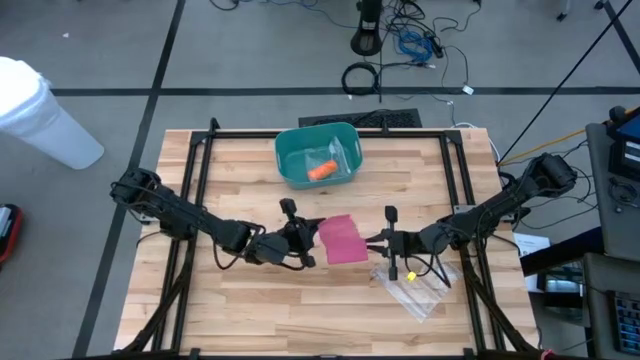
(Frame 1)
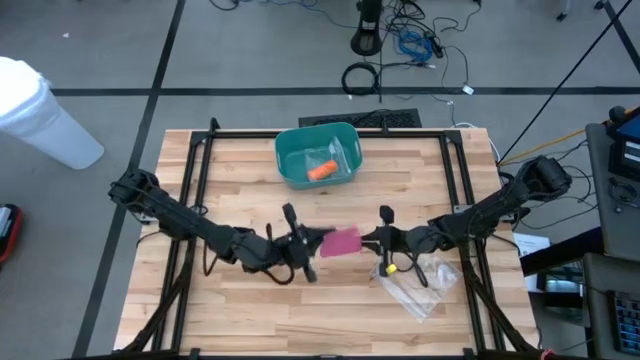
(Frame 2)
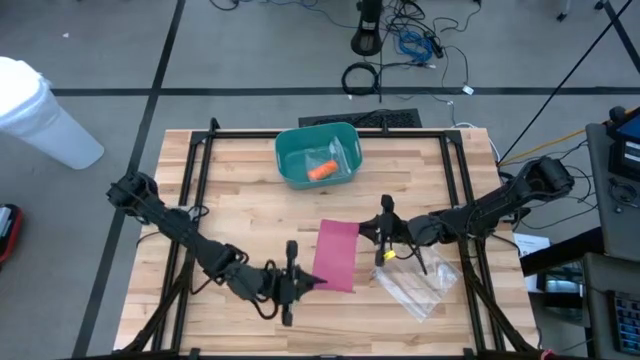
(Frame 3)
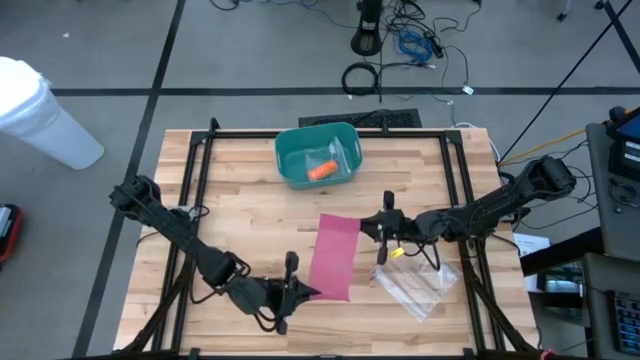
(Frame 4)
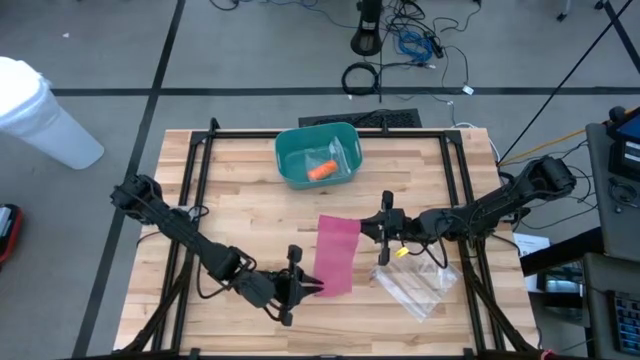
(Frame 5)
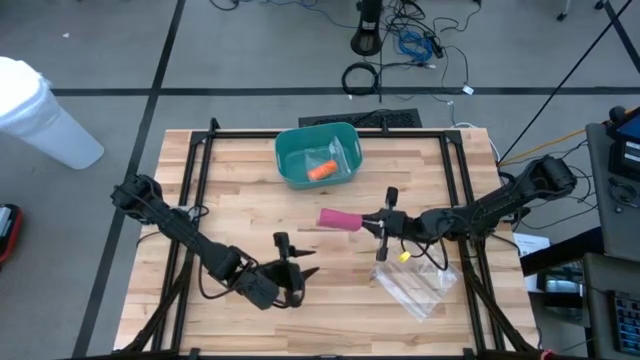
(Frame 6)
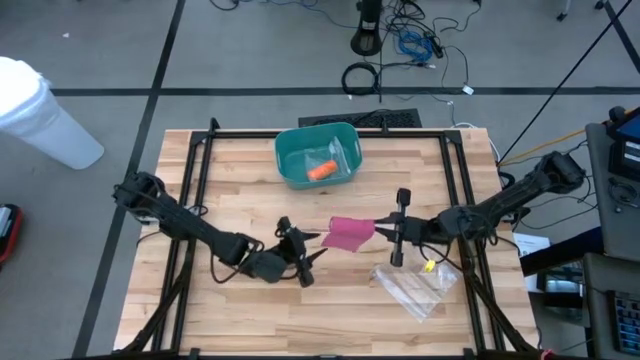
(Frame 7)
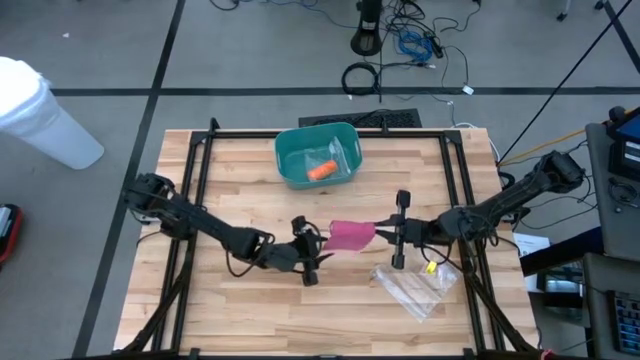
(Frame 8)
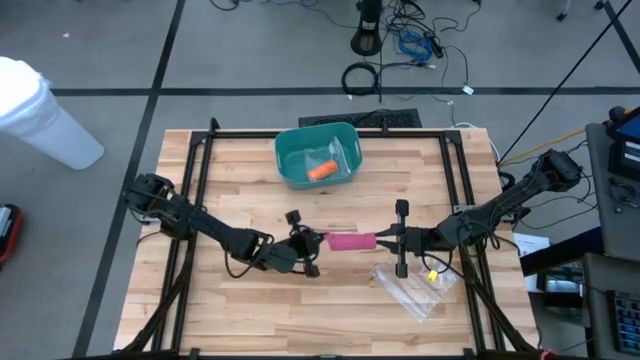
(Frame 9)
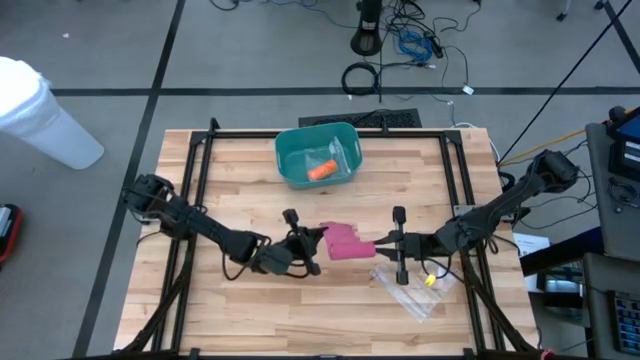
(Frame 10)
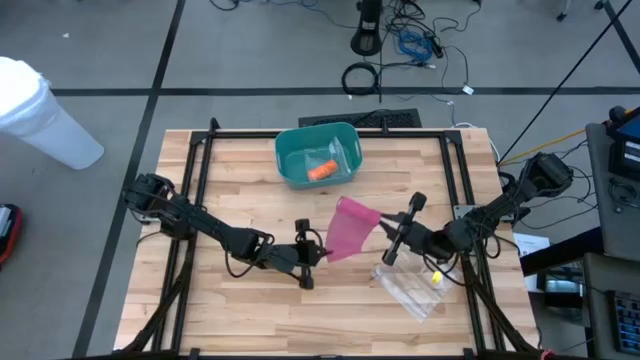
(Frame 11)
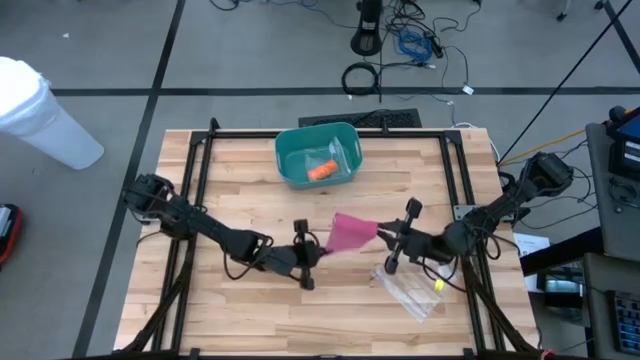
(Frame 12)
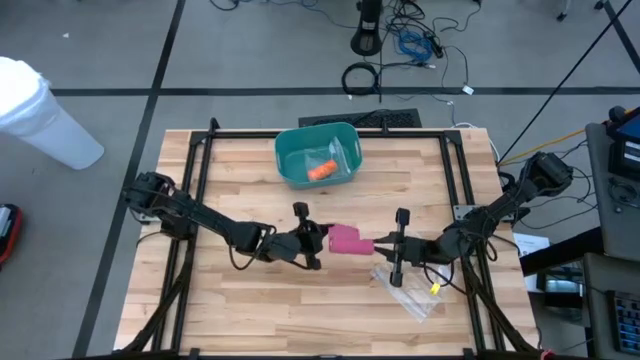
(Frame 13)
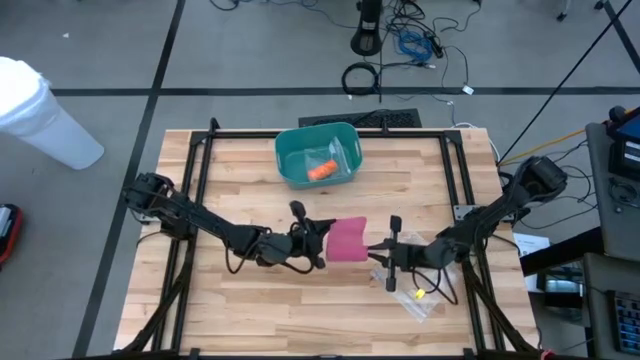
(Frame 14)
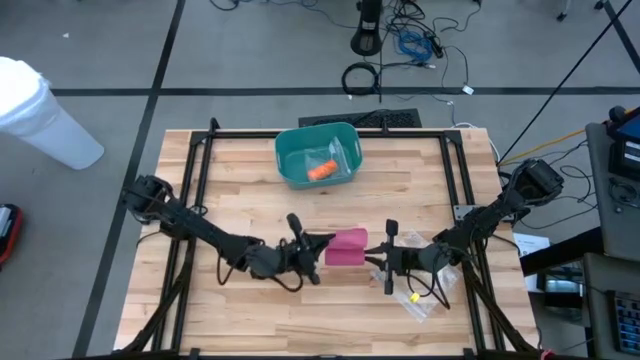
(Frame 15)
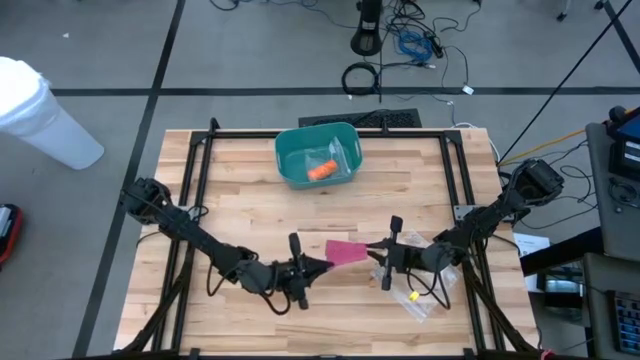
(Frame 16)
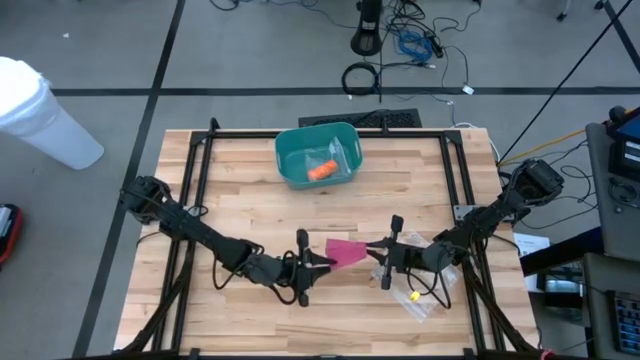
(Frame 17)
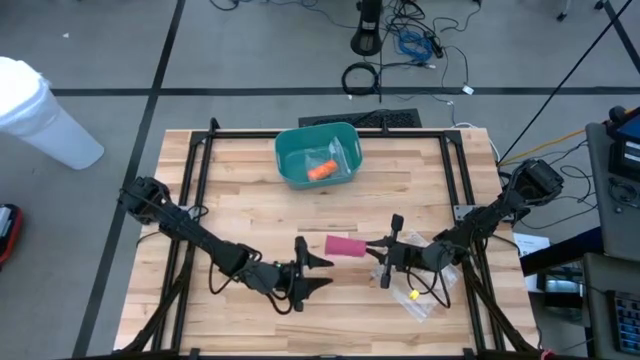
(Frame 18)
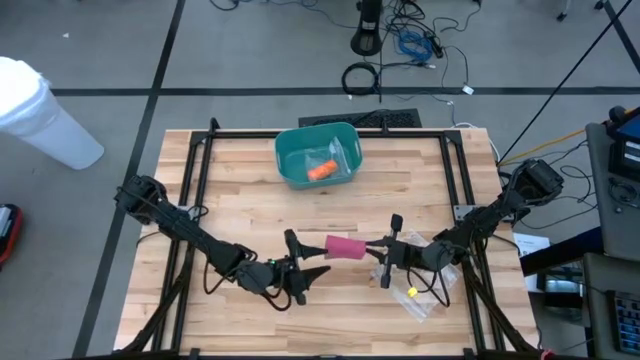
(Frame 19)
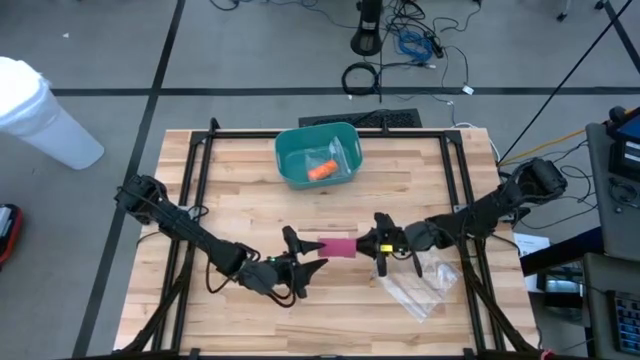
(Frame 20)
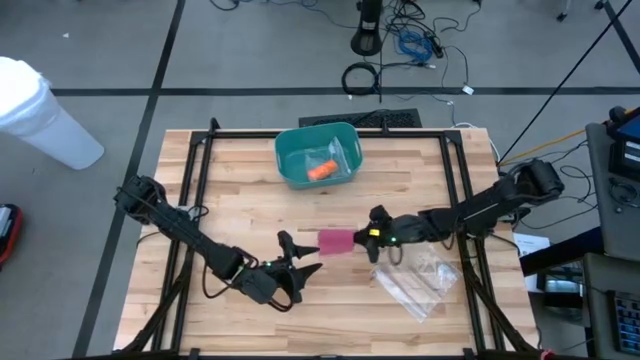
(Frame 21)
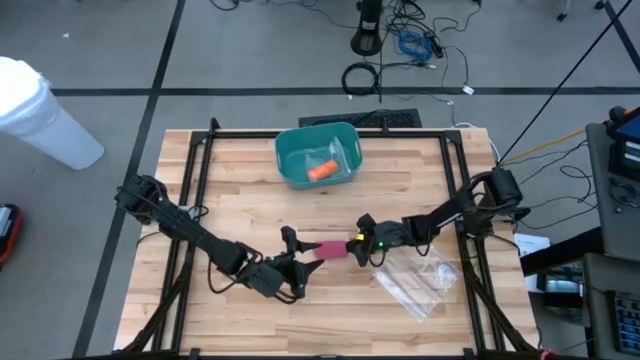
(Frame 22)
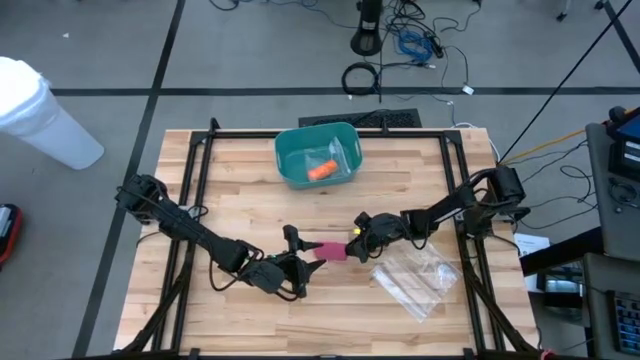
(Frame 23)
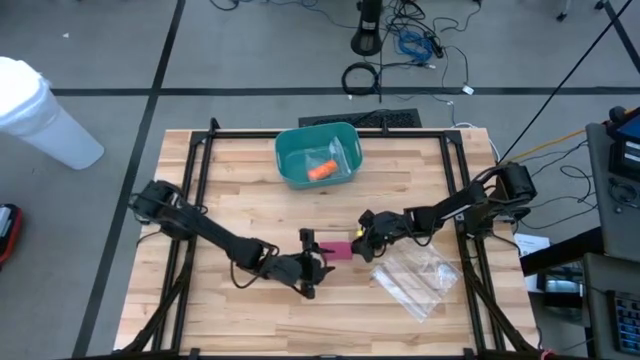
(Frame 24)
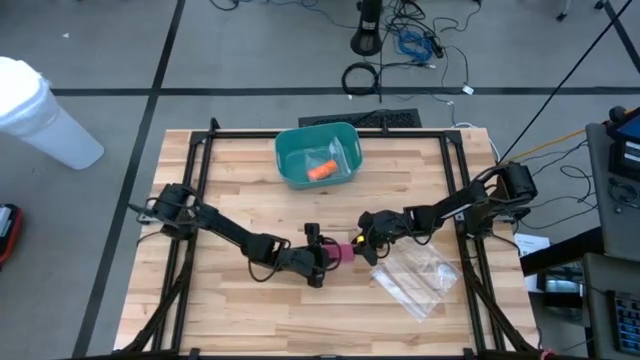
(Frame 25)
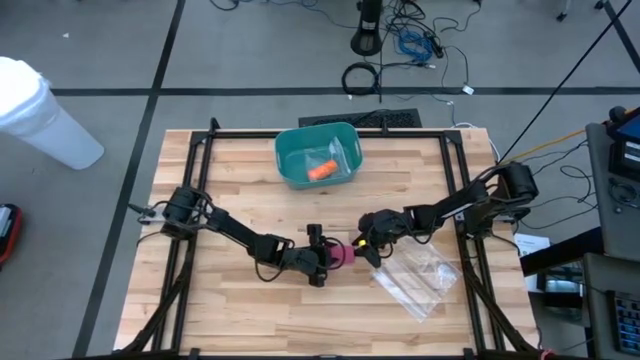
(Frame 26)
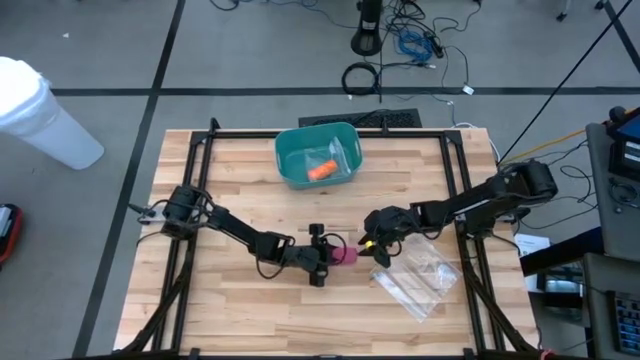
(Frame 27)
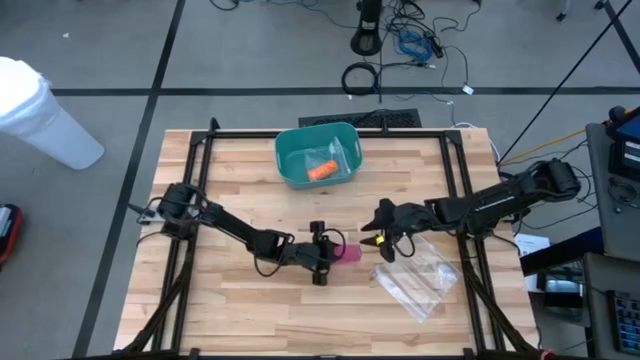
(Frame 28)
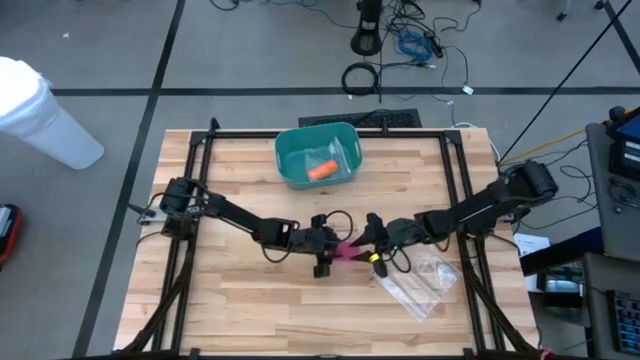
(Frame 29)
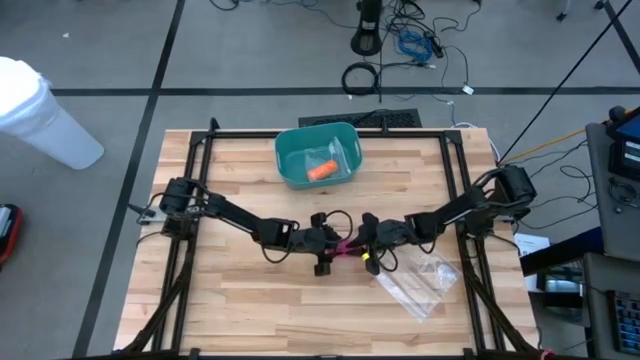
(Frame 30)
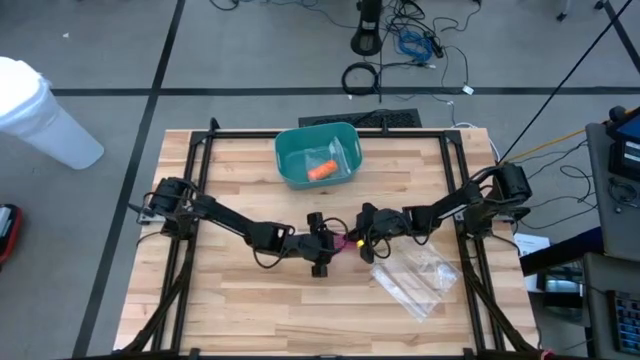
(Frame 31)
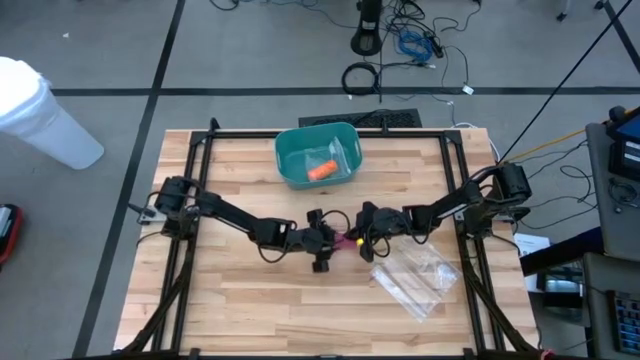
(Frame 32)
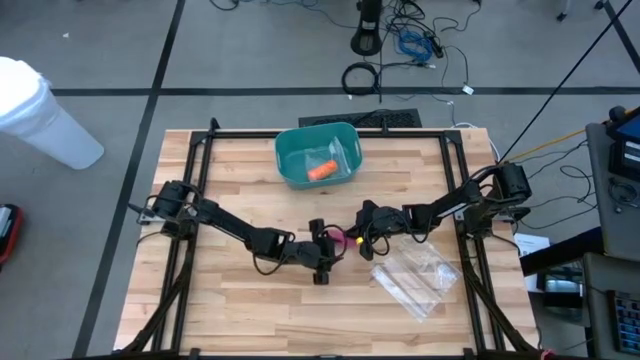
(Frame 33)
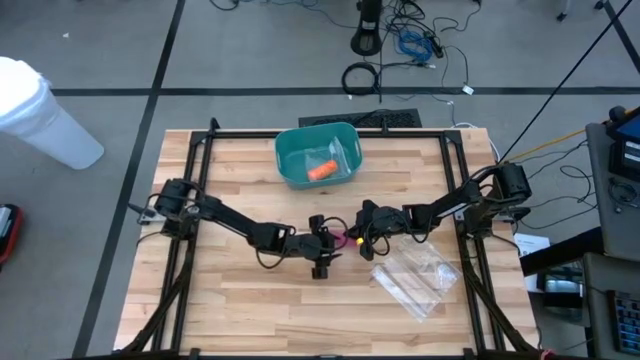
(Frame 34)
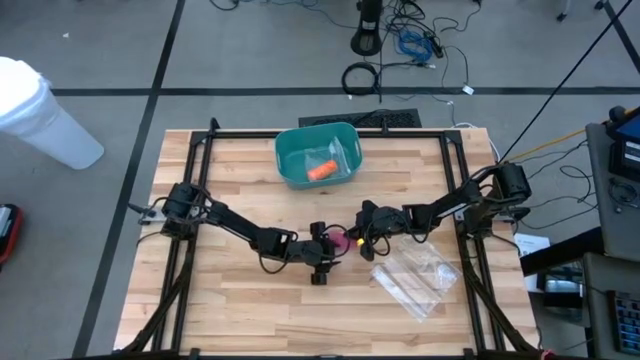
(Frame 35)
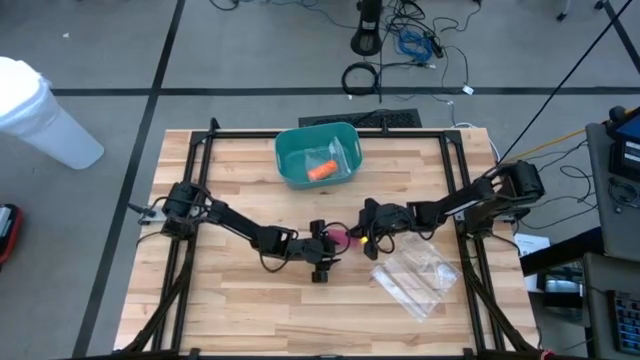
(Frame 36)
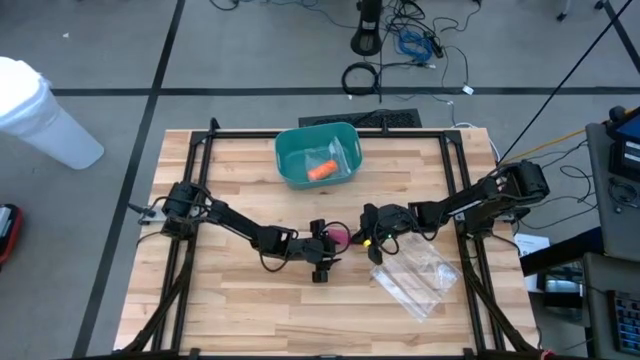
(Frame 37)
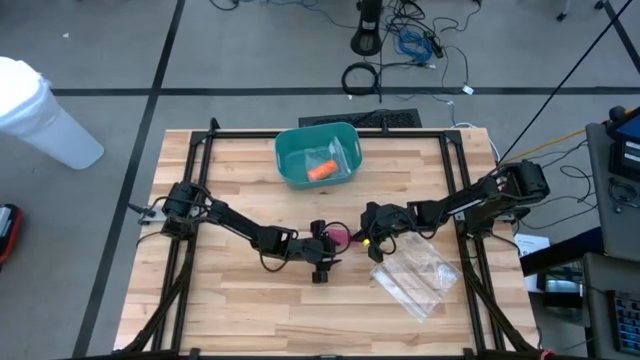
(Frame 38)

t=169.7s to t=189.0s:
Task: Roll bandage
Roll the pink bandage
